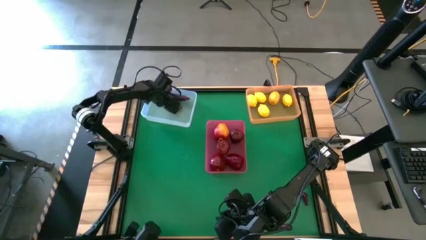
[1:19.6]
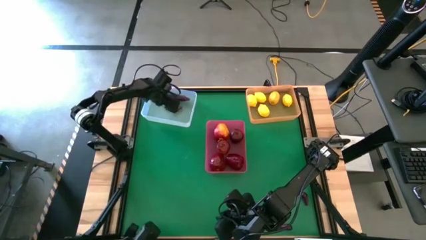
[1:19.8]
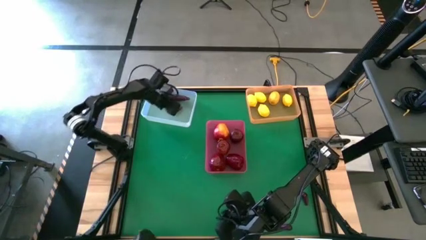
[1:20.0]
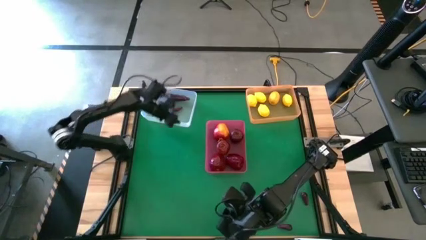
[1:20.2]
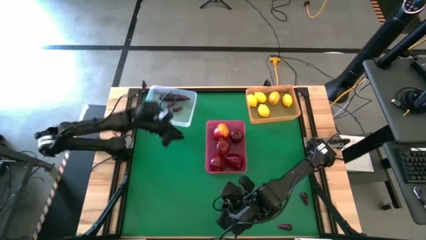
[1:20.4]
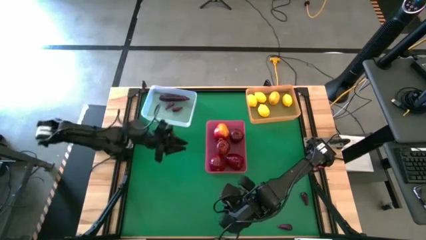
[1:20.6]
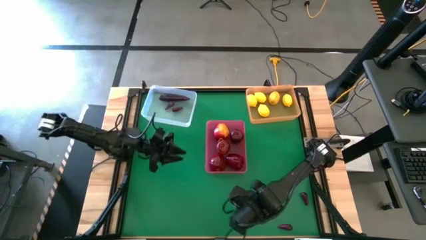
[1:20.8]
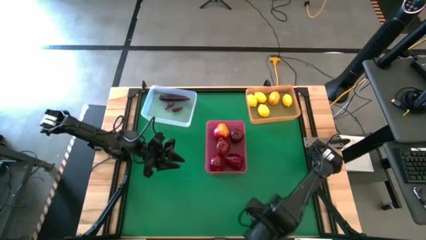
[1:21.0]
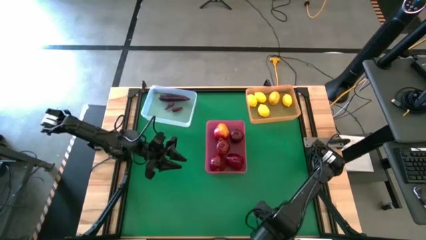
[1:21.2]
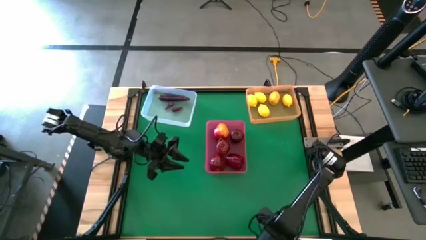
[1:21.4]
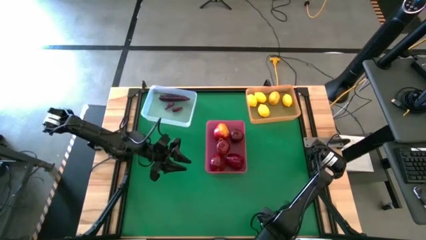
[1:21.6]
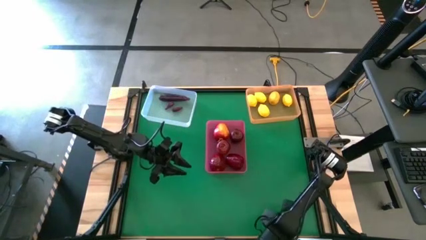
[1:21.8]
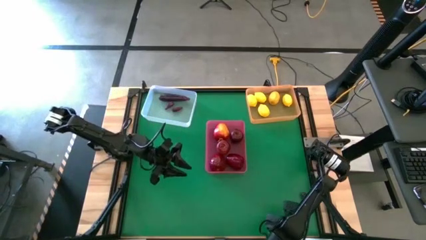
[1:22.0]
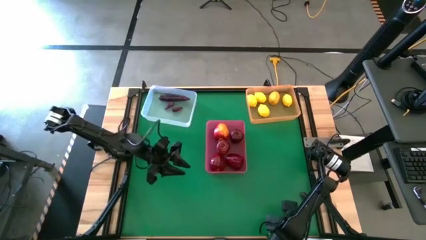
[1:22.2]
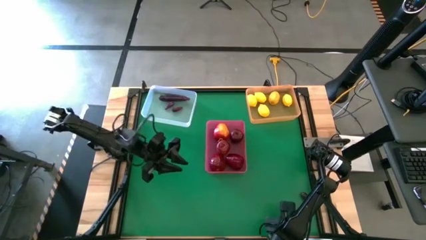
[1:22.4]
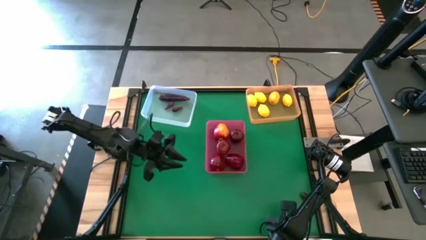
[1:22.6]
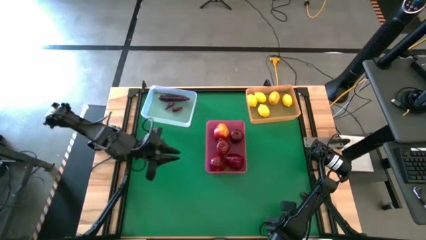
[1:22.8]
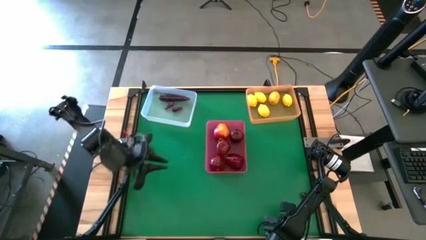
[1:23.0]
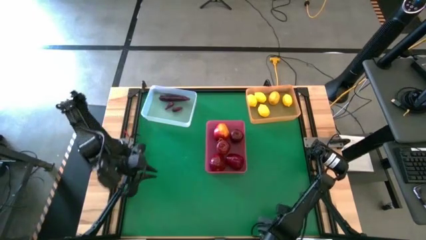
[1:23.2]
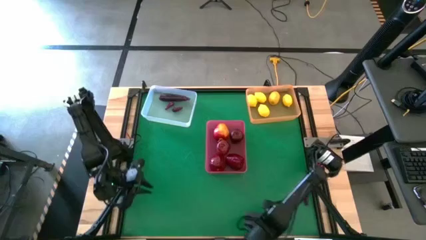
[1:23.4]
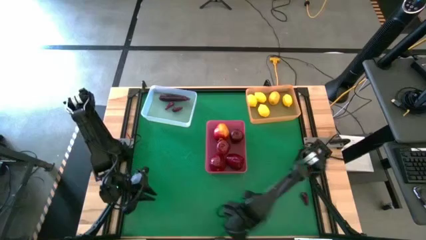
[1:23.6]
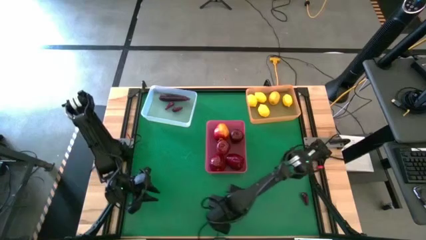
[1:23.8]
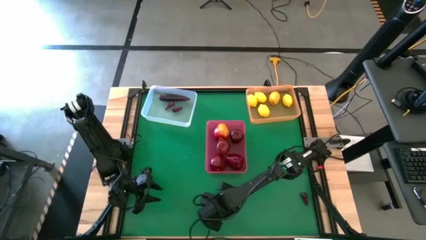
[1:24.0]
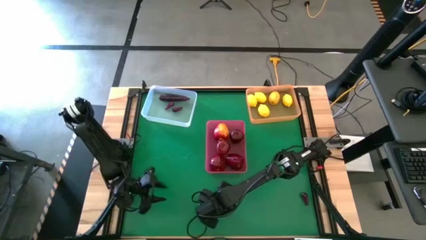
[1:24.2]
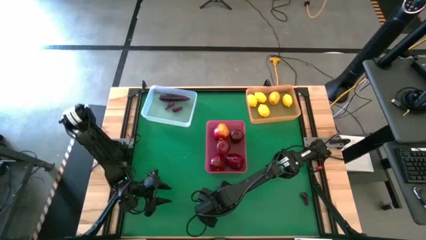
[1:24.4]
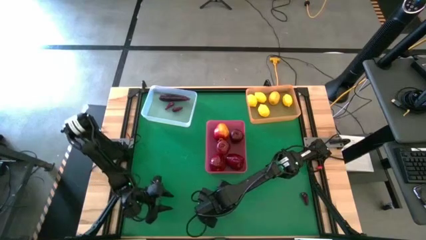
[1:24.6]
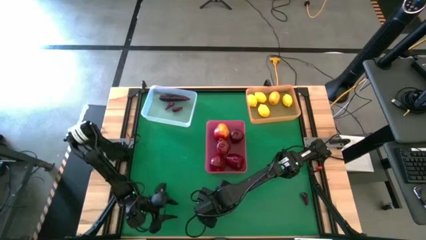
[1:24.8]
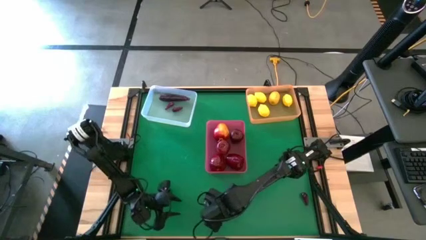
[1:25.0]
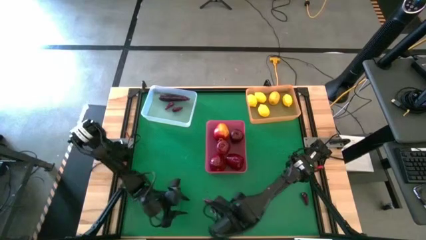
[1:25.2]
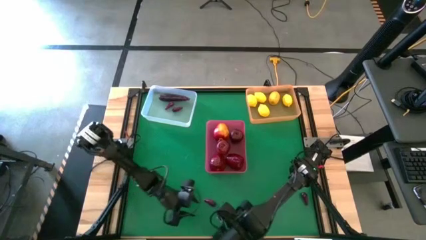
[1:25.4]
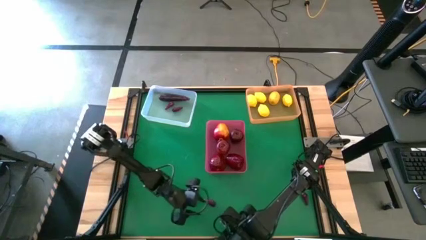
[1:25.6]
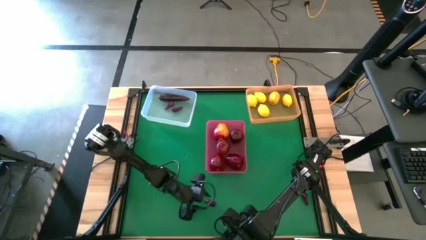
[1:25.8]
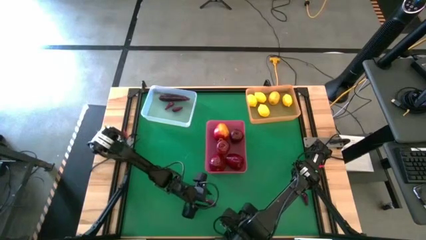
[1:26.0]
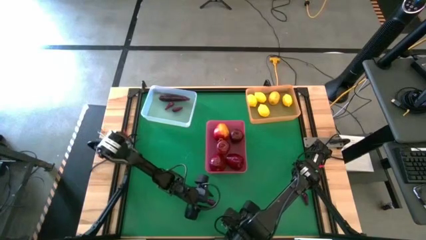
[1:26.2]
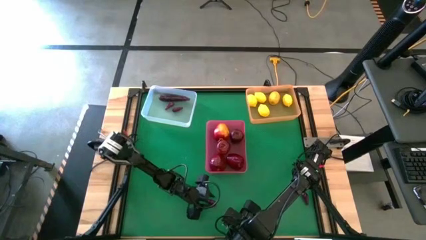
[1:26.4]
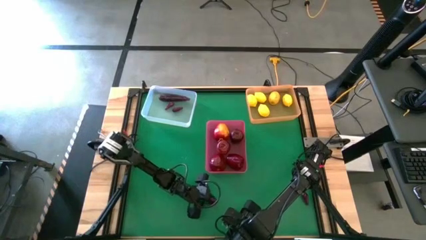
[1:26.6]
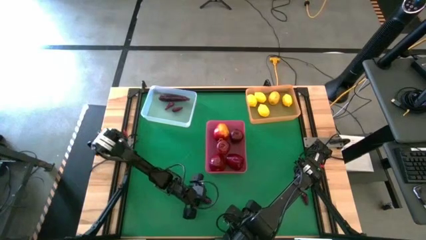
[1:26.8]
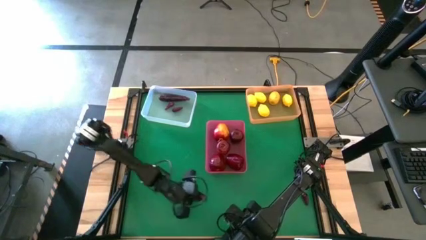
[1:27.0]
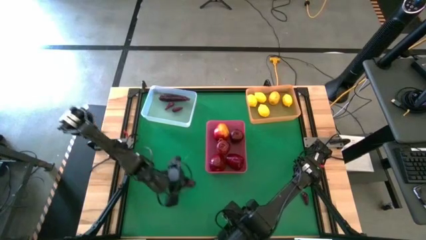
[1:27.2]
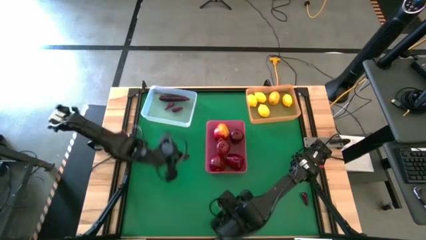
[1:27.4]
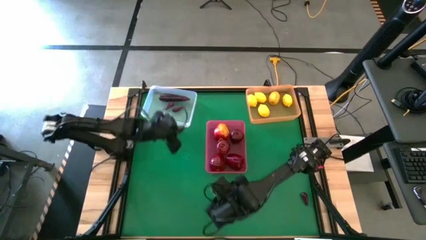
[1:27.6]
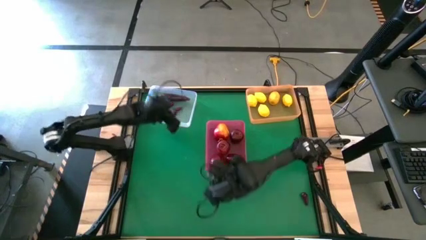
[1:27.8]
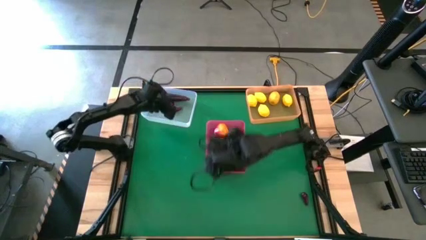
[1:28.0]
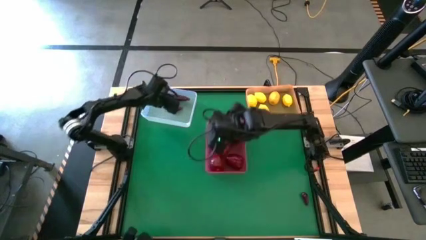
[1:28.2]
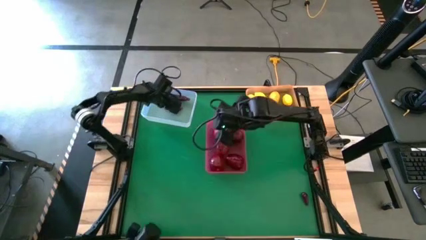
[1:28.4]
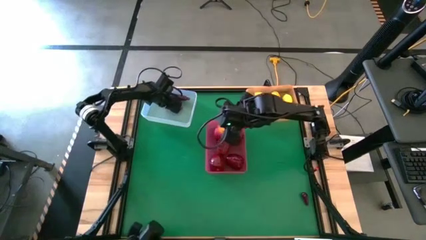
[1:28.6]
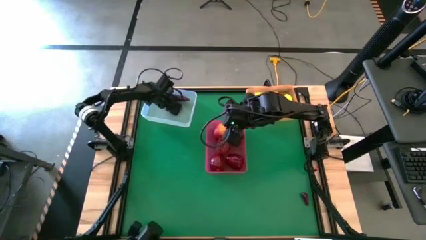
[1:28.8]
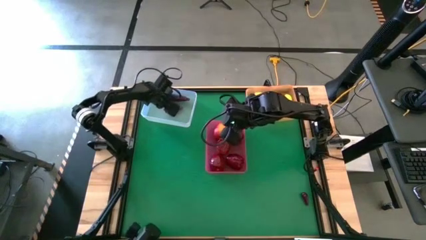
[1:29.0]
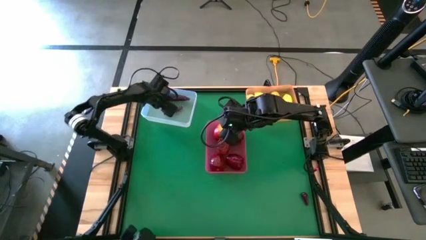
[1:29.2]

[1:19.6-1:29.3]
Task: Sort produce into baskets
Put the eggplant into the white bin

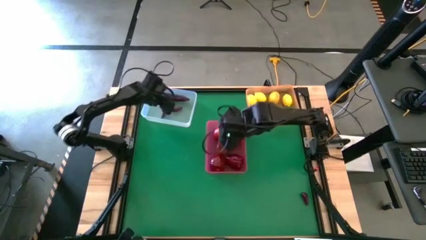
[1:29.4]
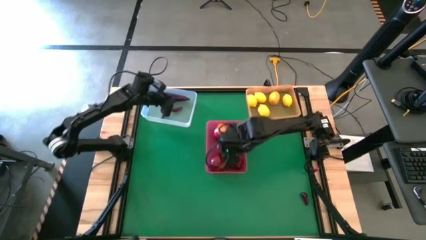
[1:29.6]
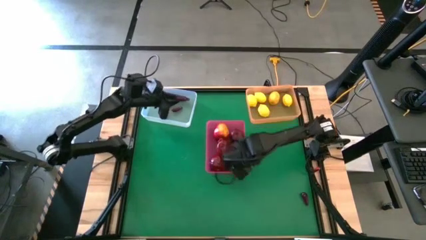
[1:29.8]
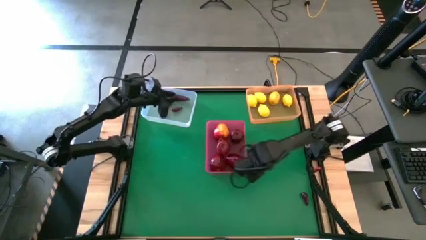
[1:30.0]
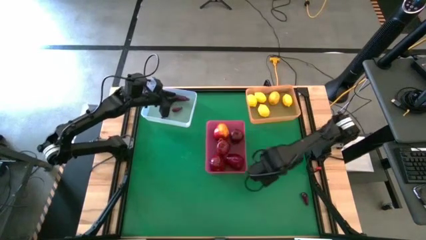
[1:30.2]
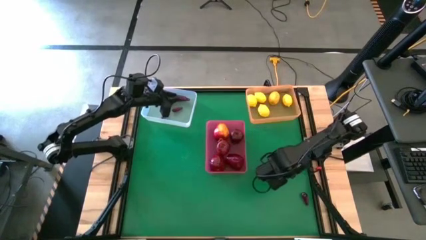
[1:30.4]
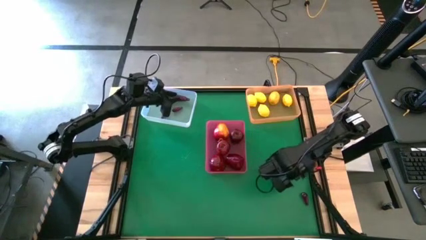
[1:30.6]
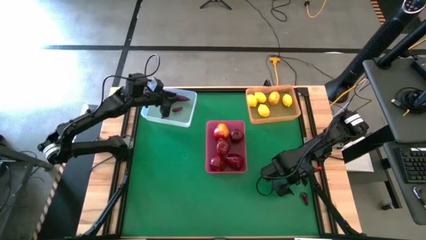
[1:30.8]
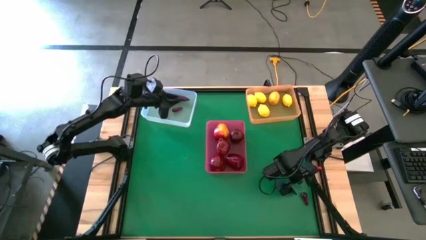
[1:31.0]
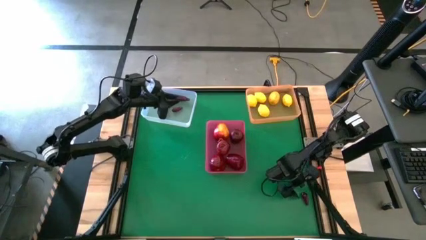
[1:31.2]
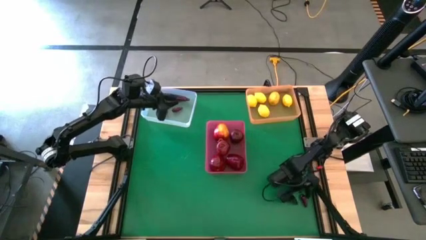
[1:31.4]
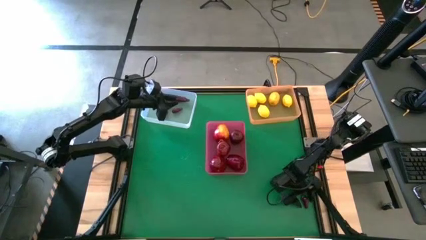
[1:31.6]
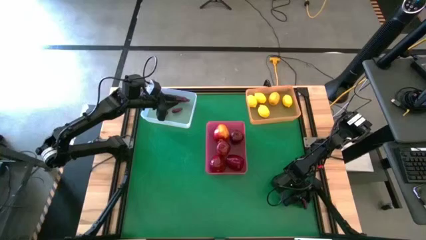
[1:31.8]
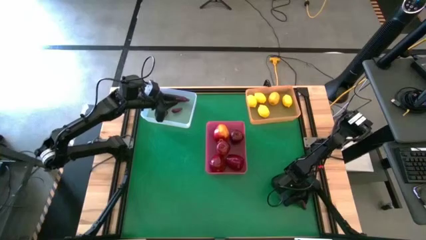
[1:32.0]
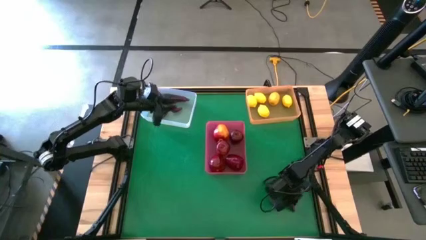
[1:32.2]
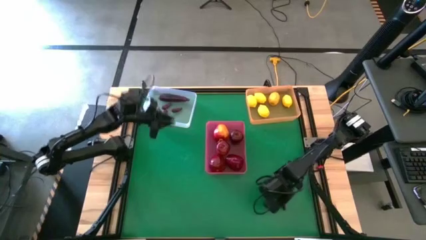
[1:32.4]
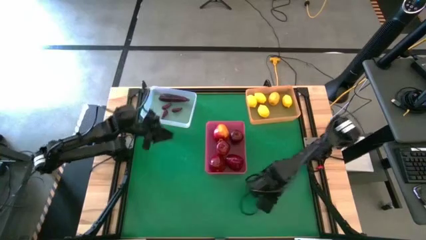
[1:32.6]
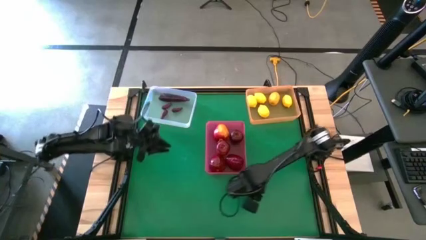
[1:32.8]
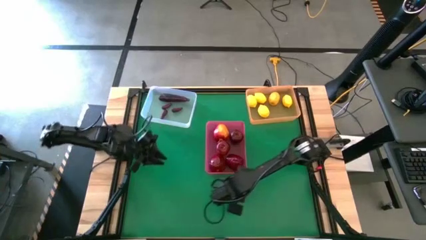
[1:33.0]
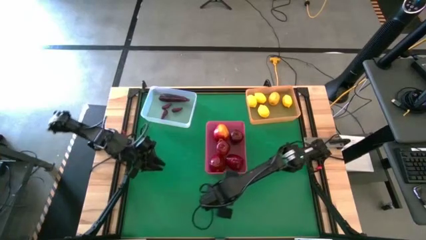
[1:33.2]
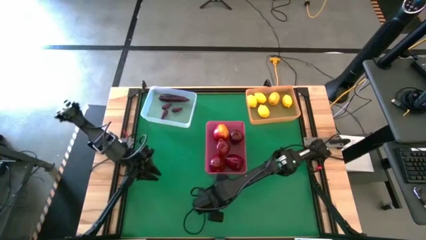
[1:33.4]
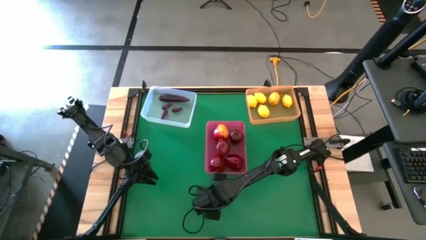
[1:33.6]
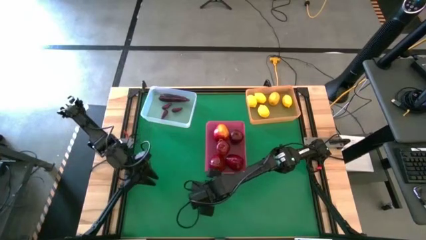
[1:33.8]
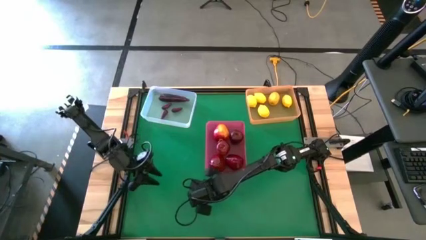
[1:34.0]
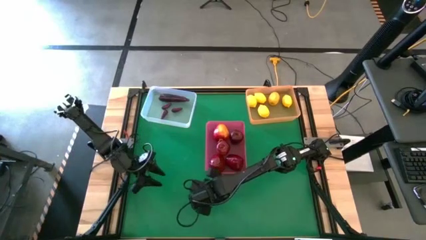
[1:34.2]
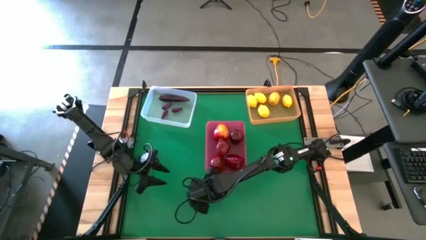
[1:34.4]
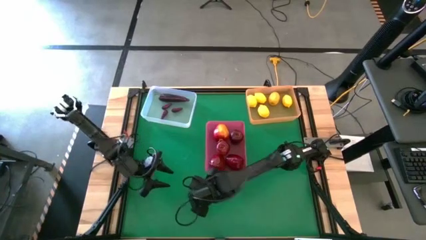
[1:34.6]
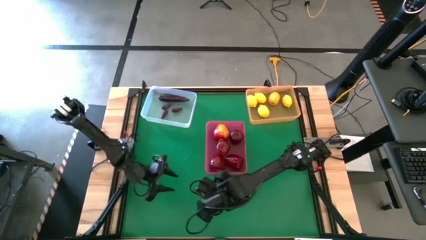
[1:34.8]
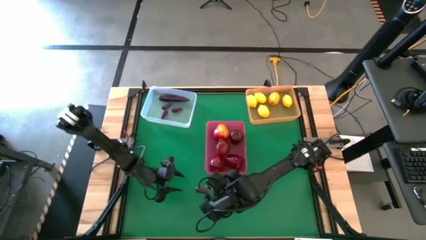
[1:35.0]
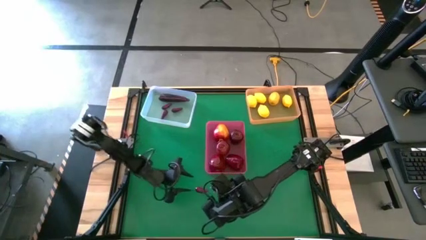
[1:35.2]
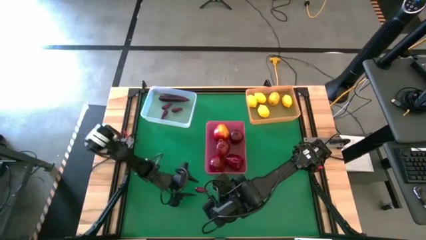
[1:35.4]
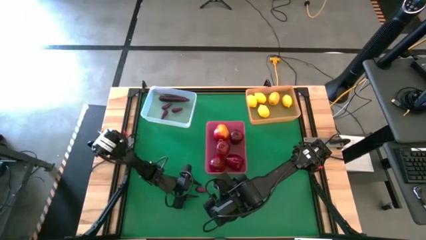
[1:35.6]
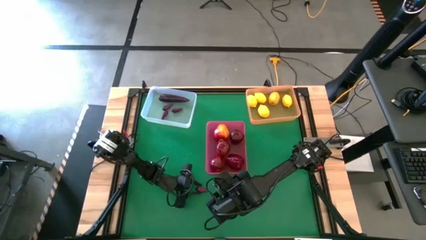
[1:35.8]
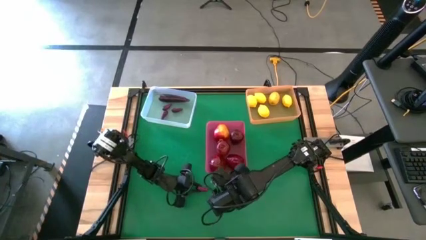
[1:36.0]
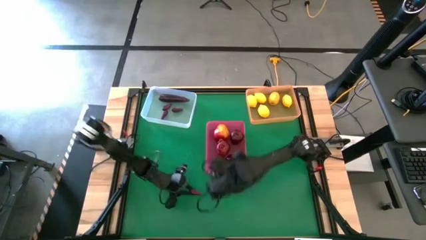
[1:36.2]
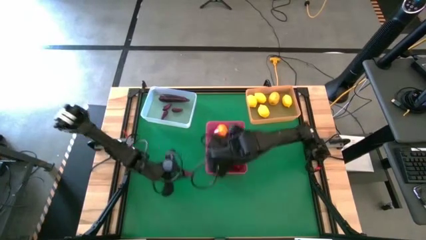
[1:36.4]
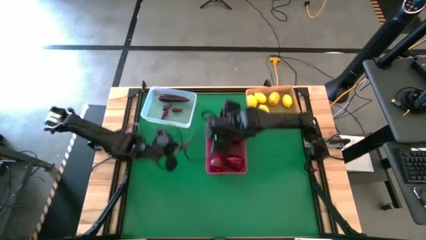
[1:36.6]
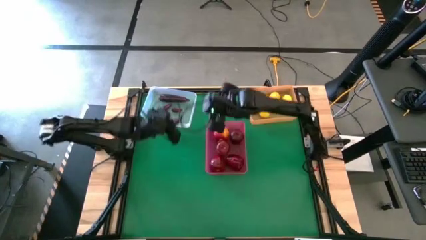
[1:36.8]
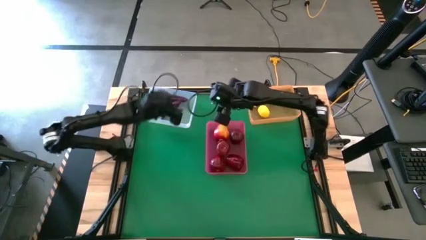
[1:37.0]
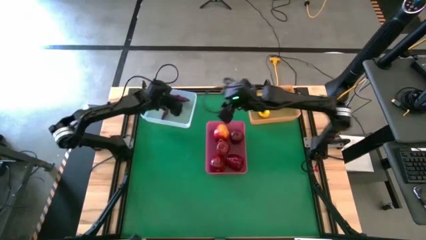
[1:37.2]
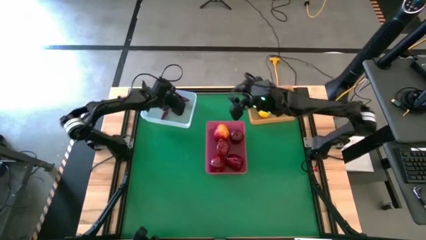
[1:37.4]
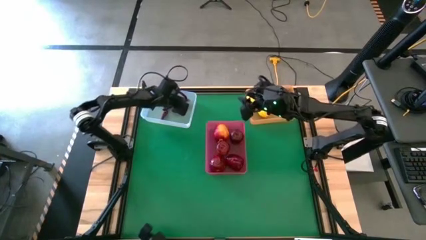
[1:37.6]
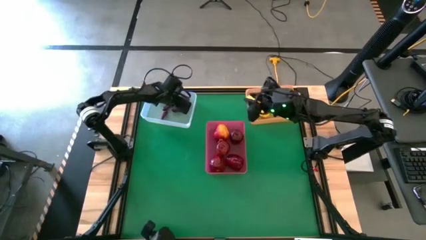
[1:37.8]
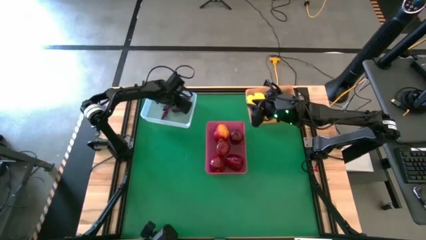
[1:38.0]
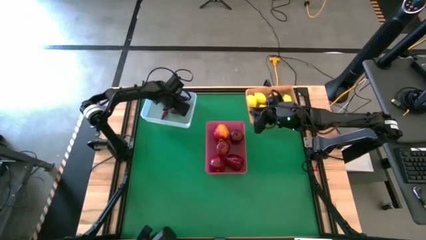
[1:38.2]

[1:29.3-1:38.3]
Put the eggplant into the white bin
